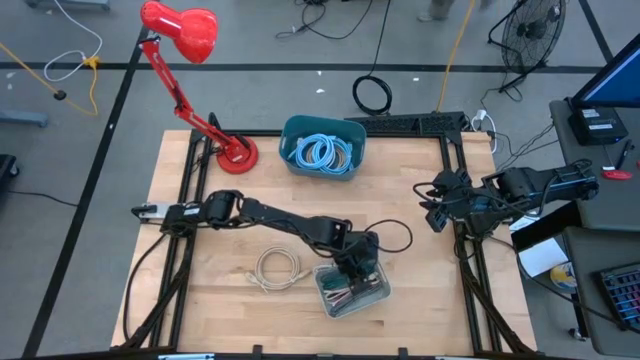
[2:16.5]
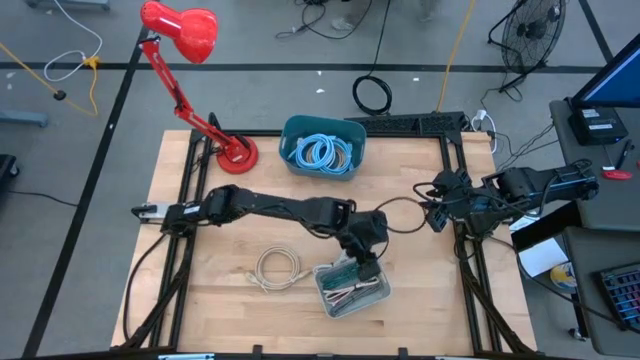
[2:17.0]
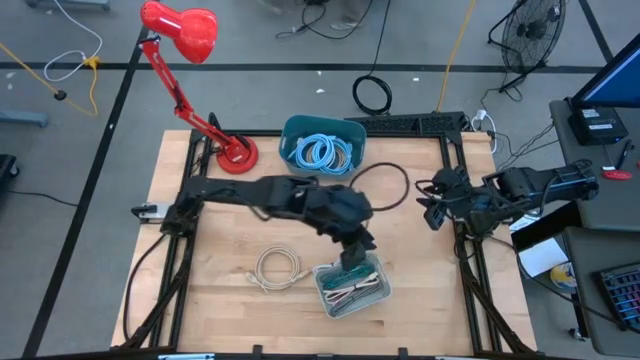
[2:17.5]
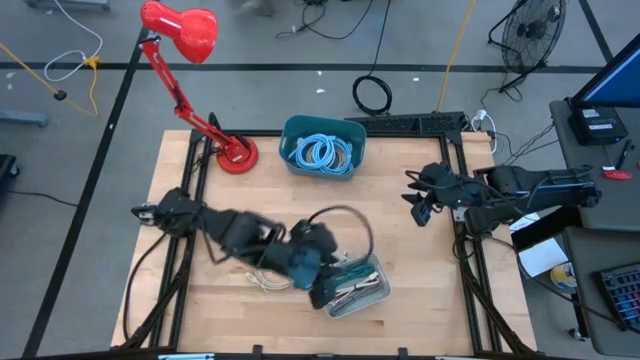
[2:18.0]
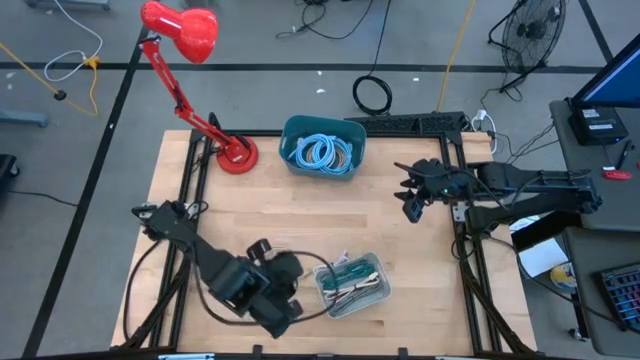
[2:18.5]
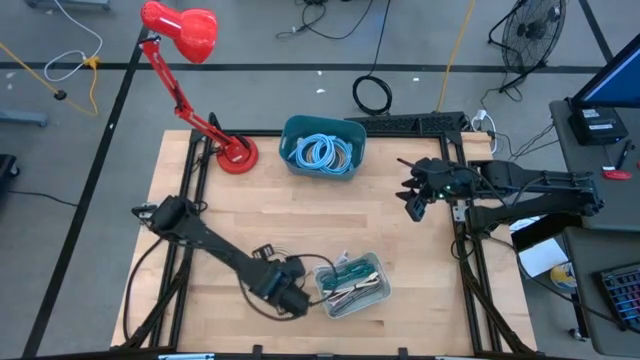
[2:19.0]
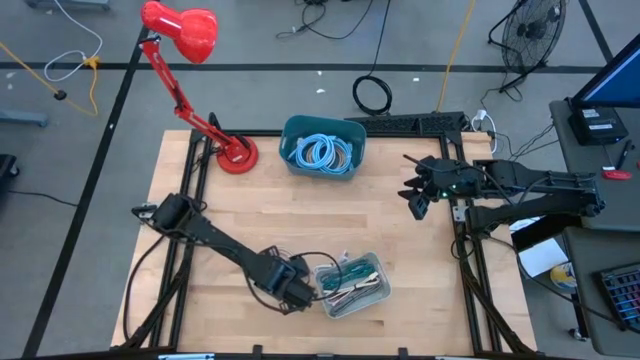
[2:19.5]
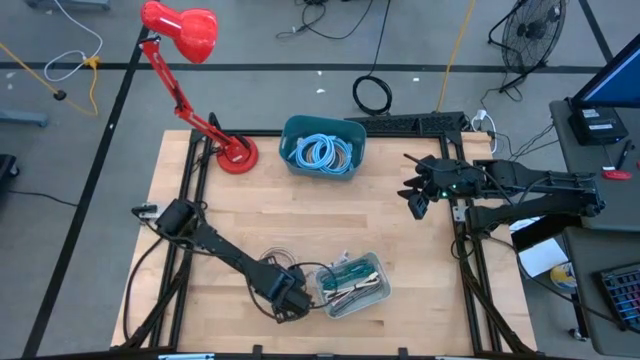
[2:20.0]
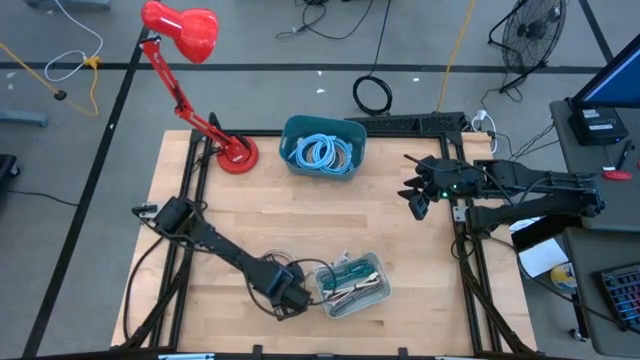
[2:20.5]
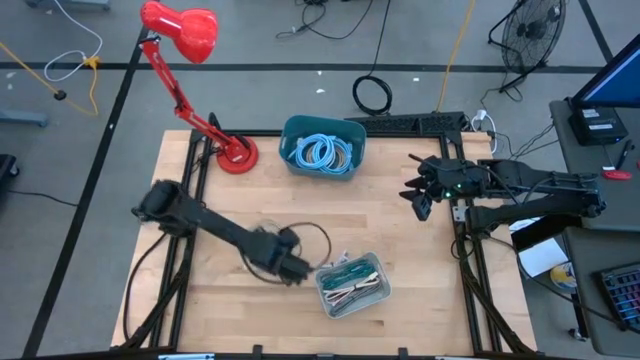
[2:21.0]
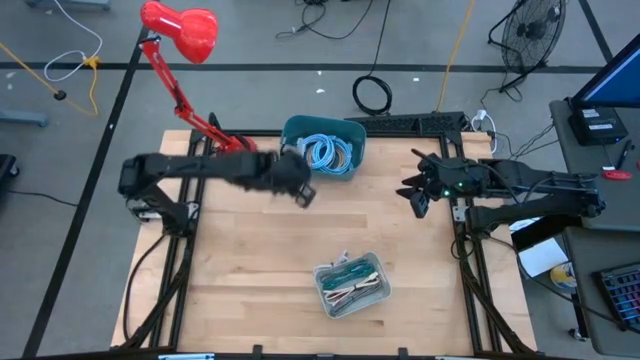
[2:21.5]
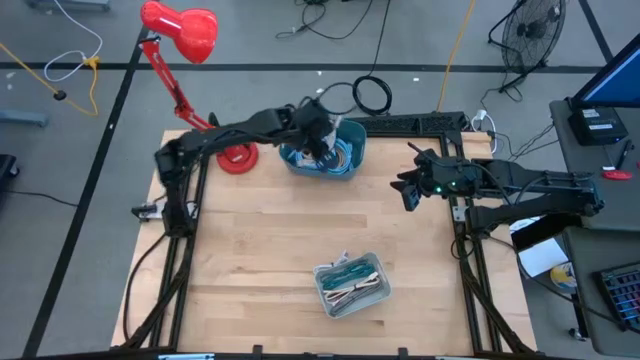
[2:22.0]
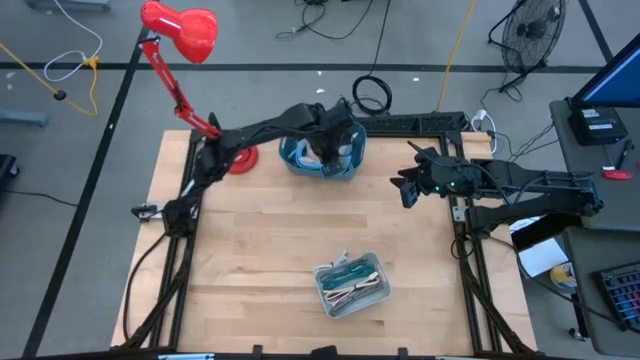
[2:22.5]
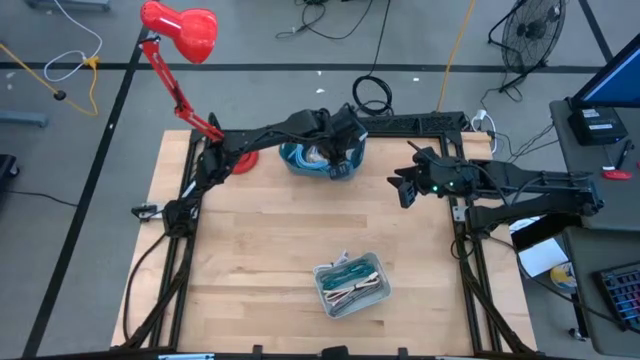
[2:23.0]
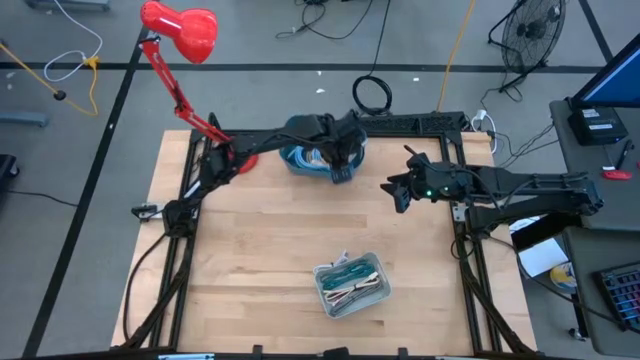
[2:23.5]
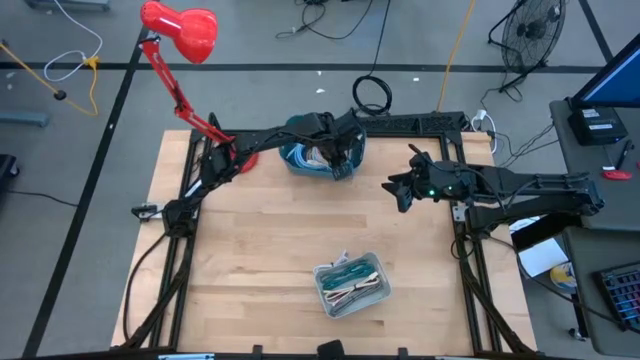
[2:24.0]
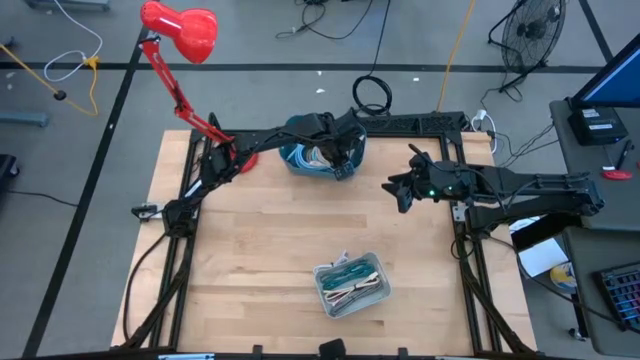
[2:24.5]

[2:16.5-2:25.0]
Task: Pick & Place USB Port
Put the brown hdmi cable into the green bin

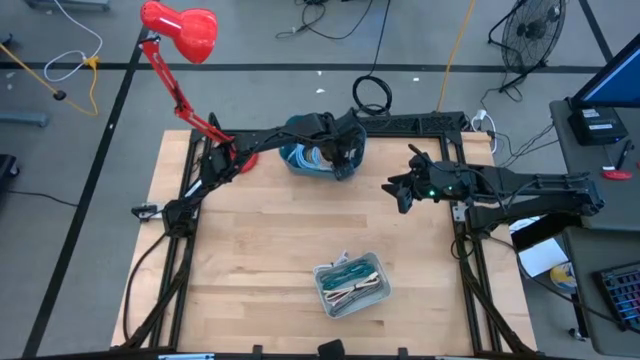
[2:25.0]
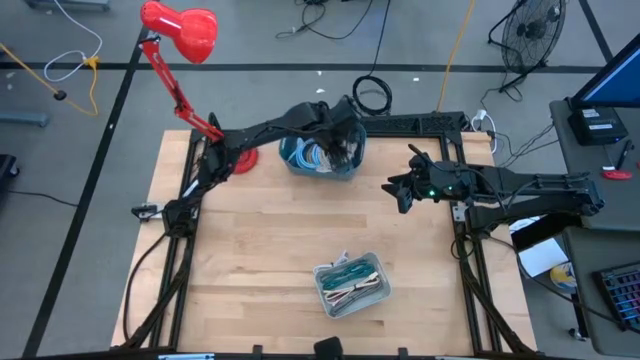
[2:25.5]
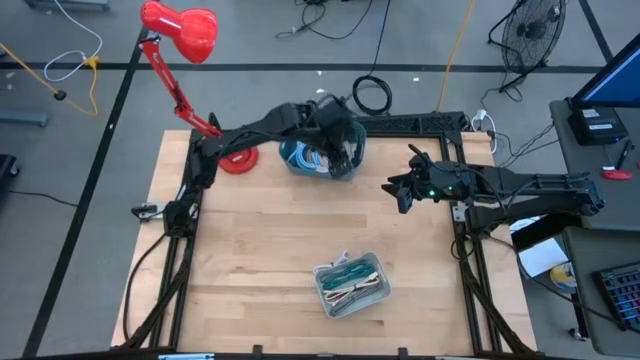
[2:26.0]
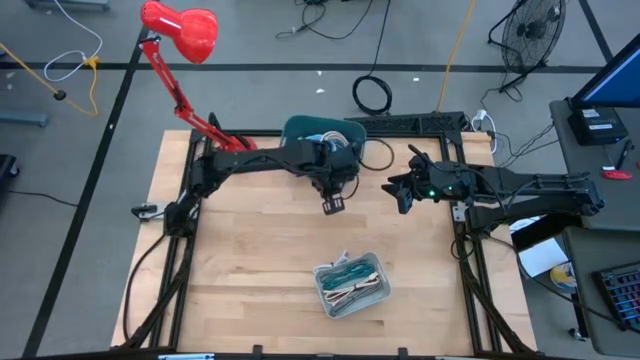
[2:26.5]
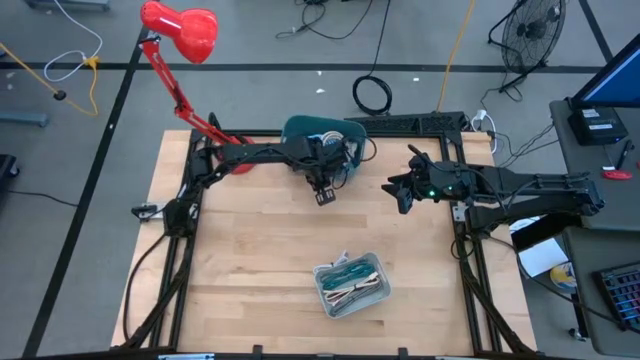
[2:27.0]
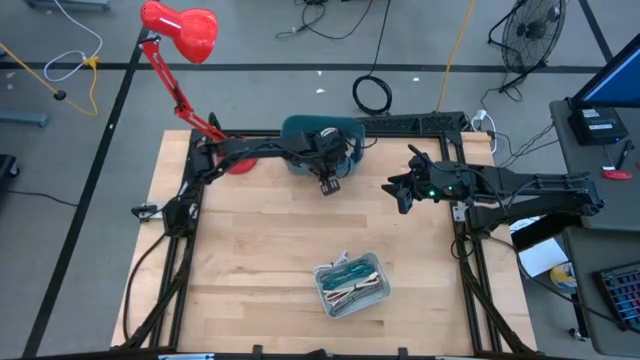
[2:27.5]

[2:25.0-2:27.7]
Adjust the green bin

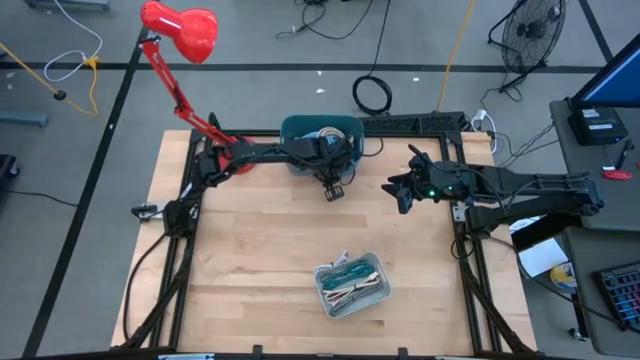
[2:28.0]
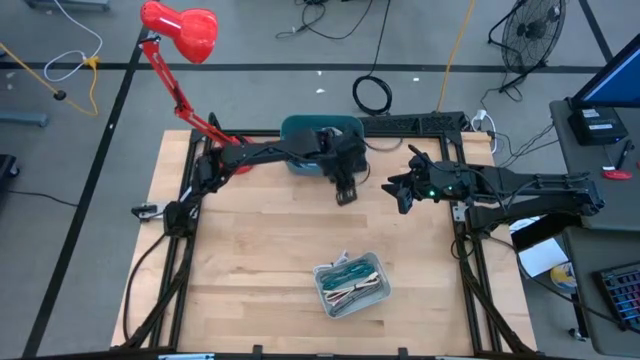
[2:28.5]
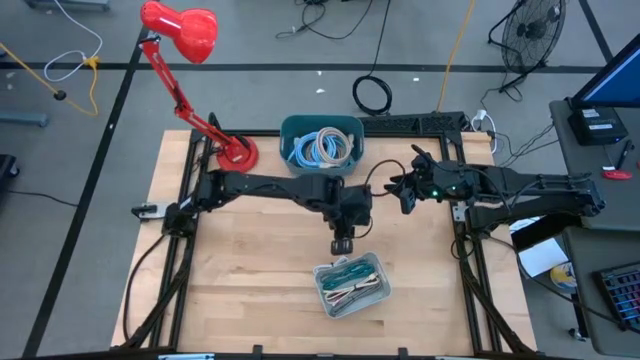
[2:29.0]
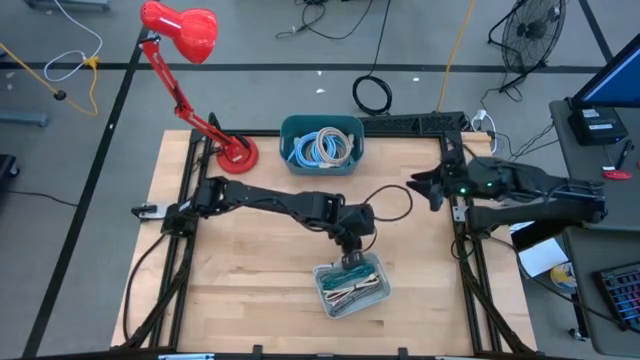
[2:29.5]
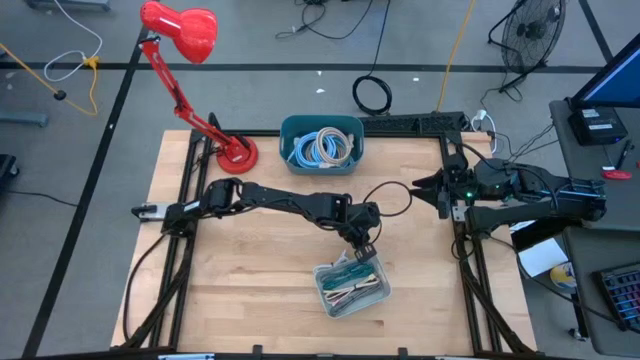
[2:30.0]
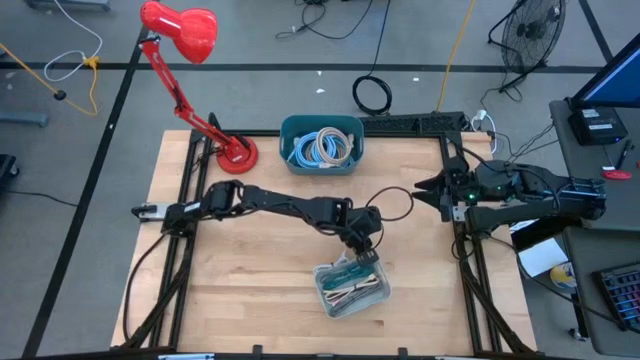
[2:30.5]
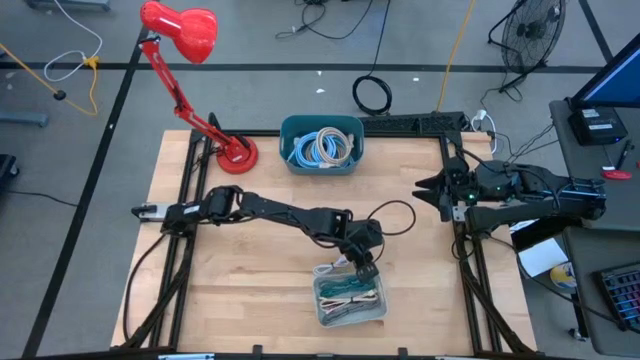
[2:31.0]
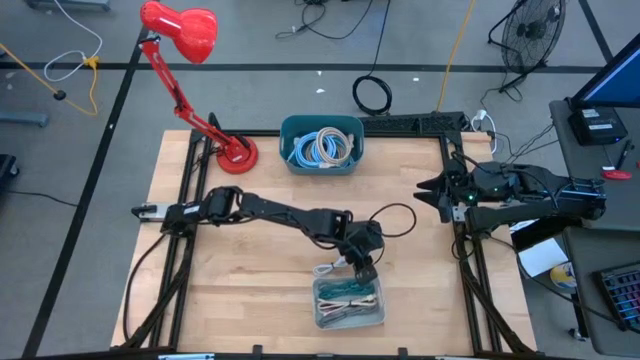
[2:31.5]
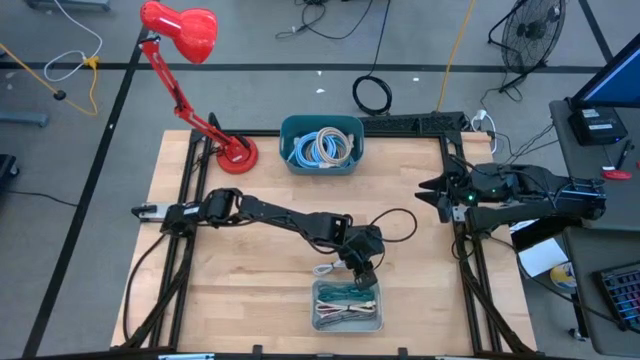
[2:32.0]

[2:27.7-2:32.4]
Adjust the gray bin

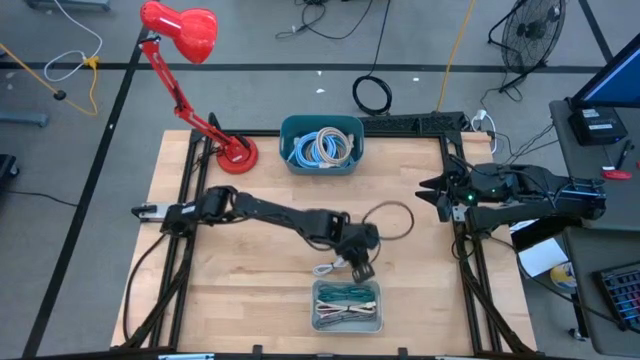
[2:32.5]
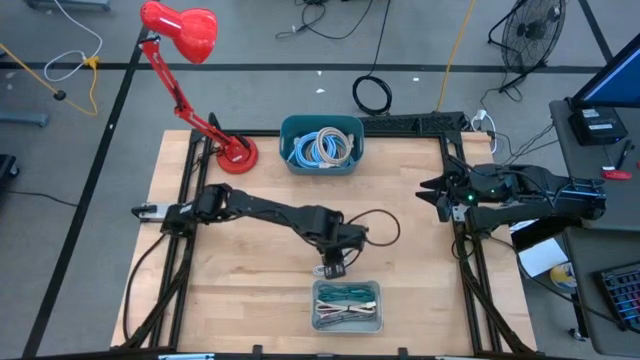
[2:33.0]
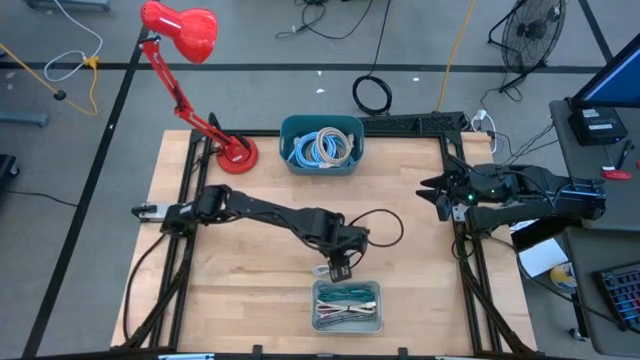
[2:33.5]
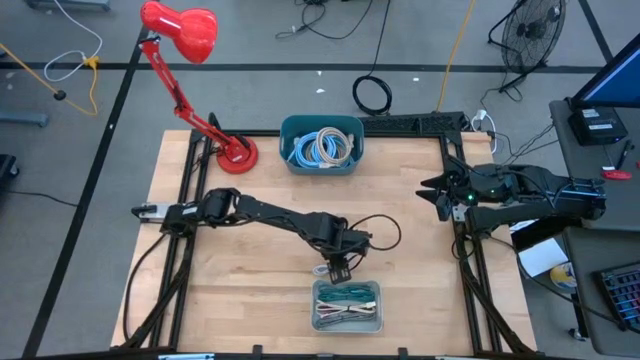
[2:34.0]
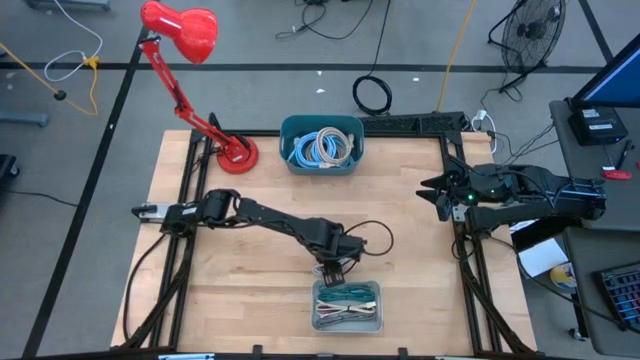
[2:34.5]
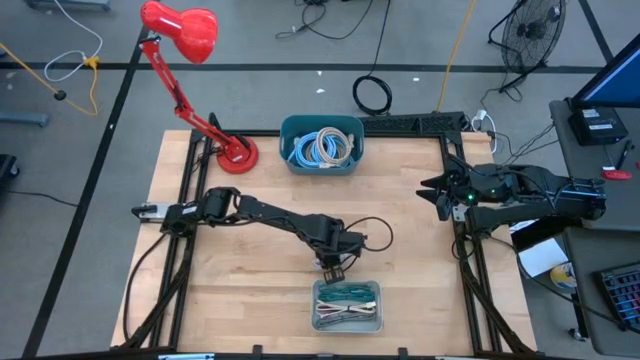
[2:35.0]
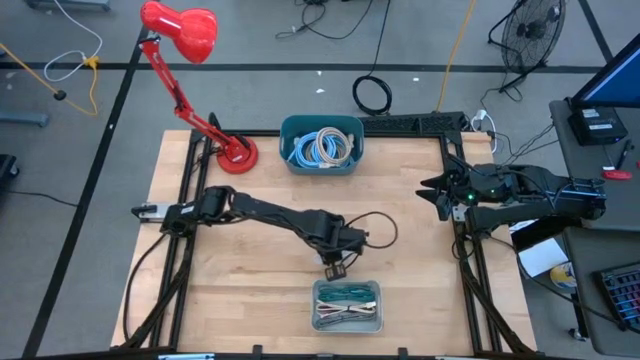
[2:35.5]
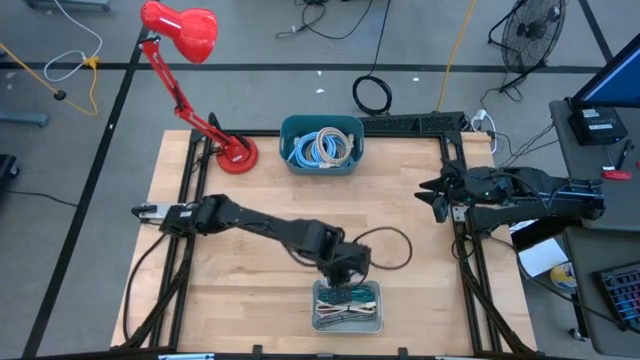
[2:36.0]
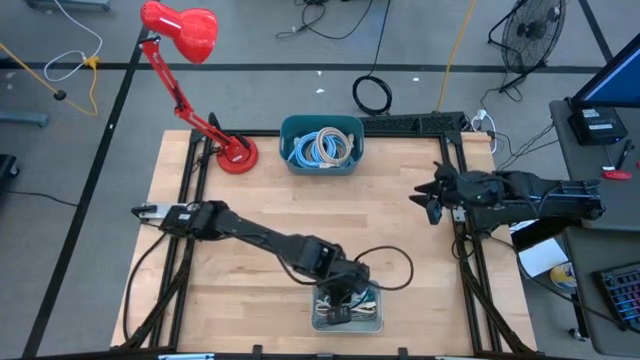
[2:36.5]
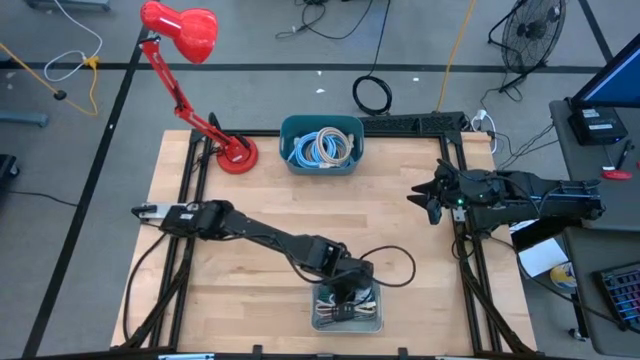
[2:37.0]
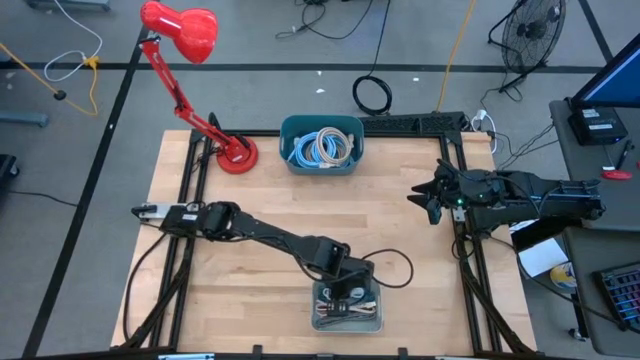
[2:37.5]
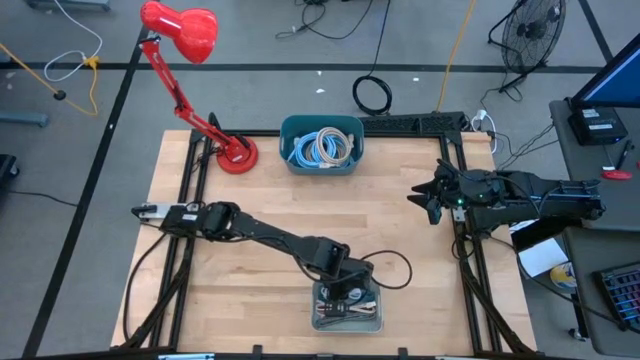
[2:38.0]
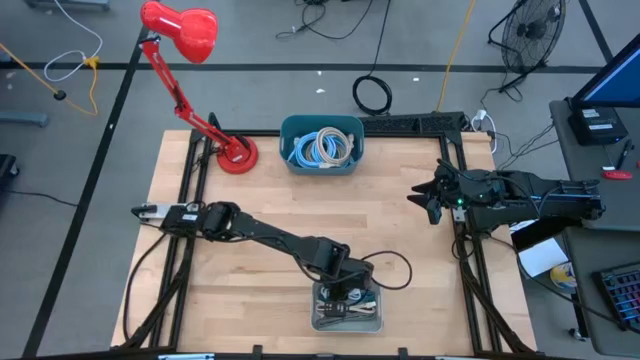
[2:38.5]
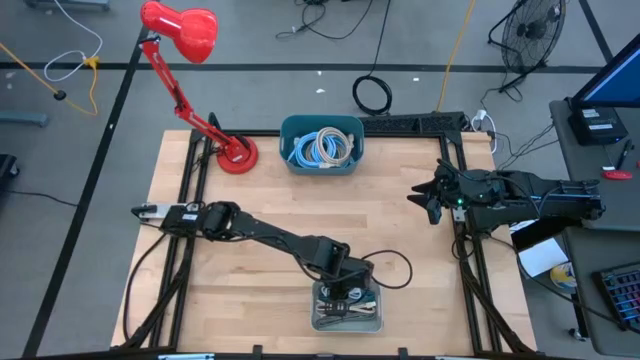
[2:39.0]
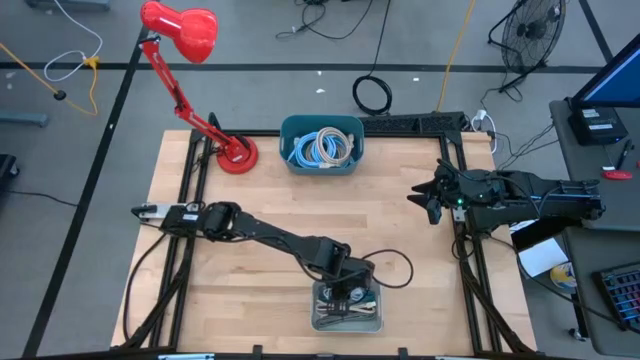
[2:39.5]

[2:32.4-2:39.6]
Put the white charger cable into the gray bin
